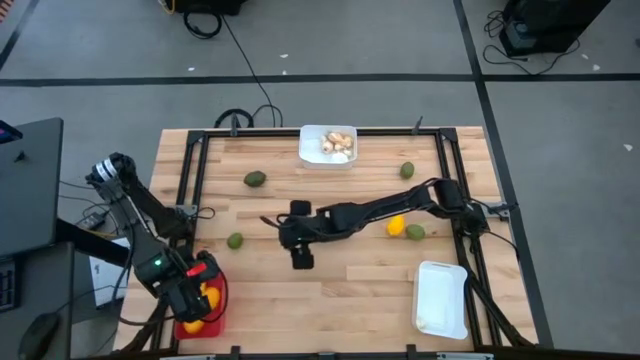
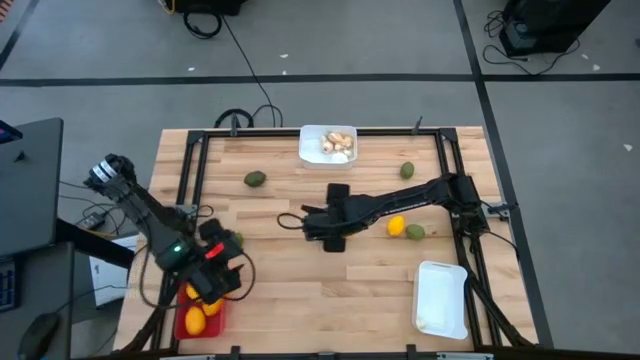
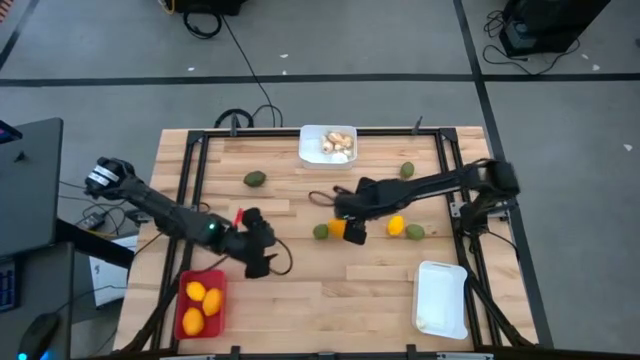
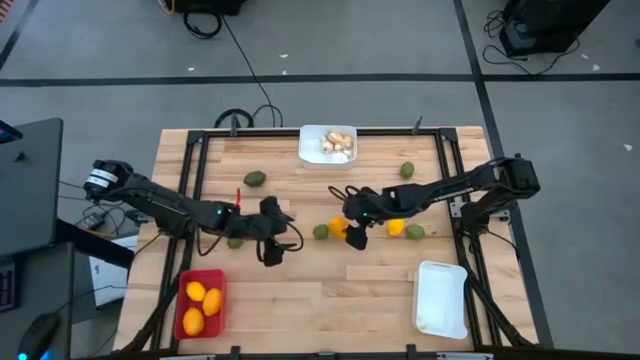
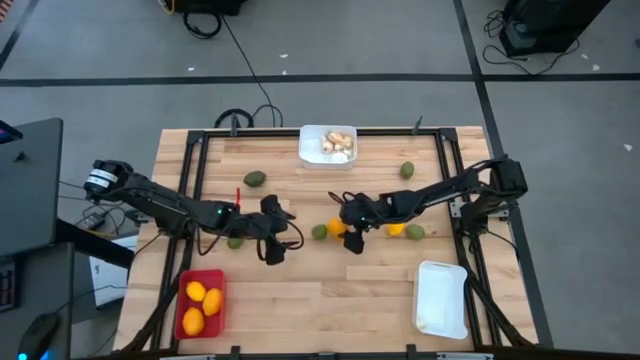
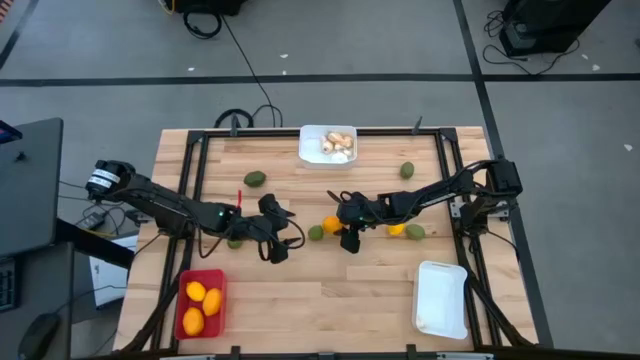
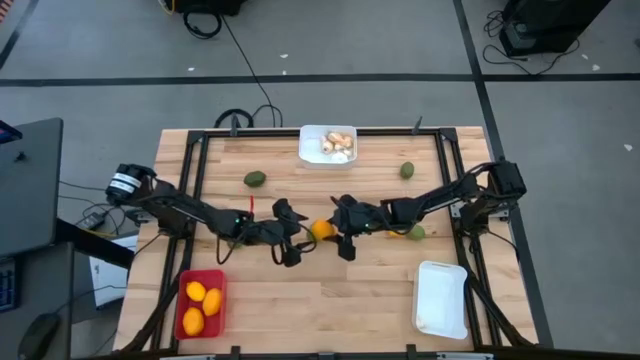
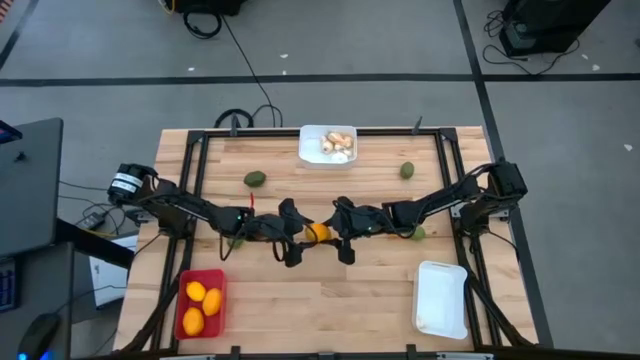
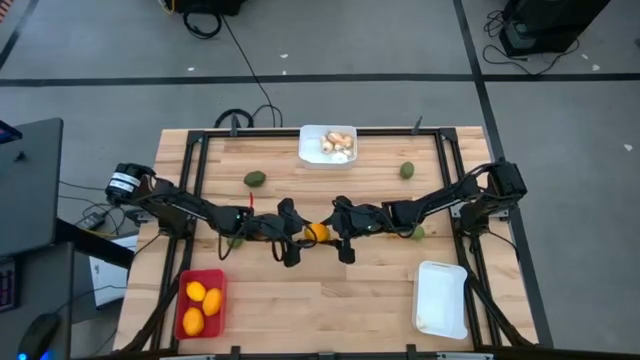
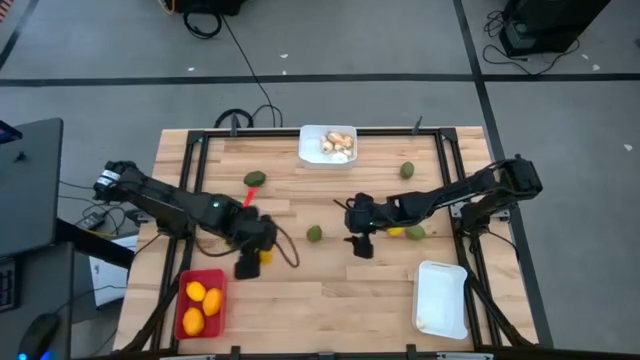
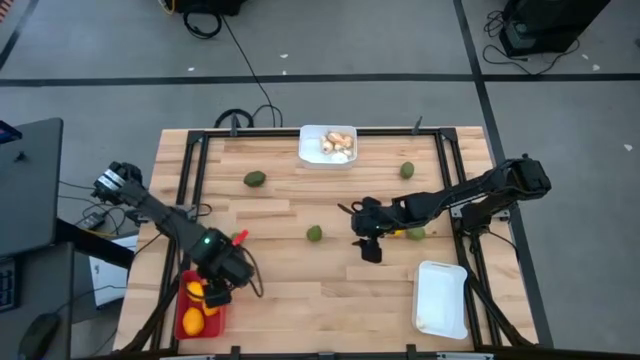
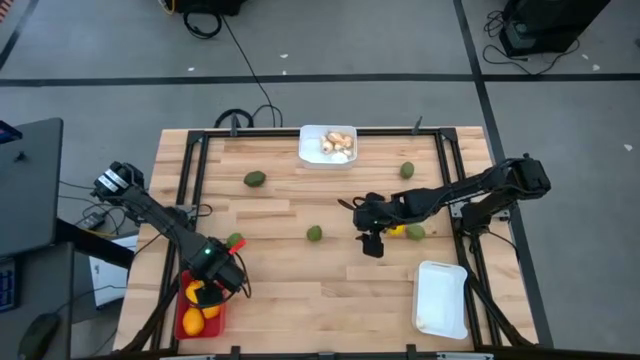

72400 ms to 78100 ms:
Task: Sort produce into baskets
Put the lemon into the red bin

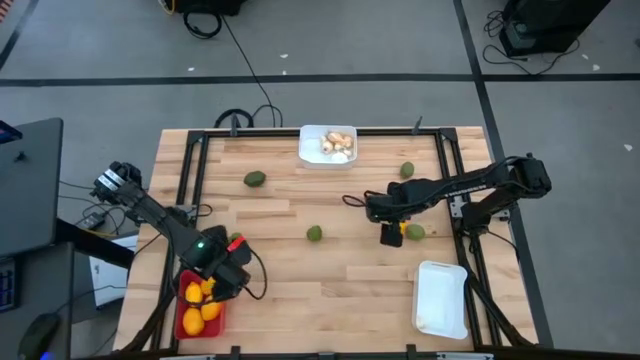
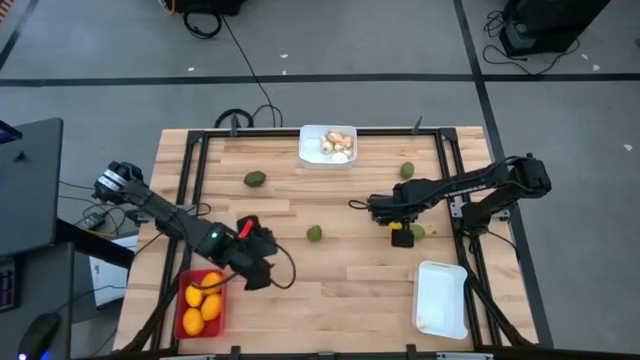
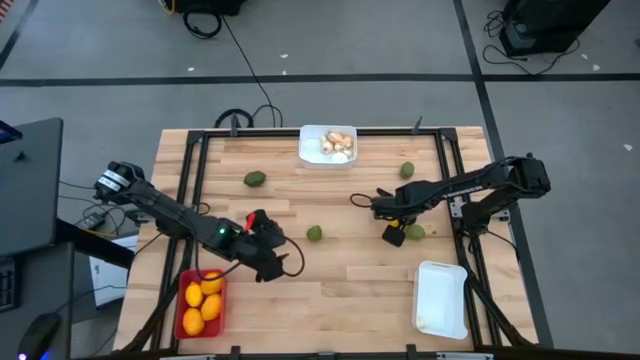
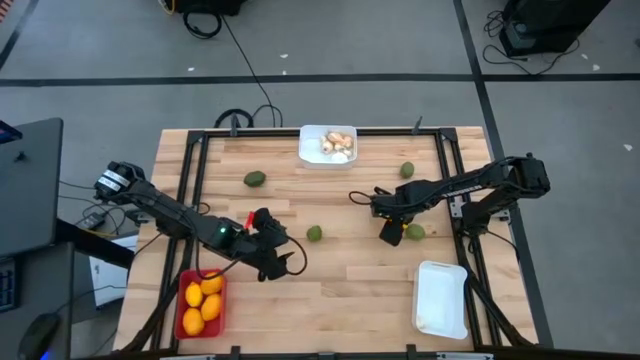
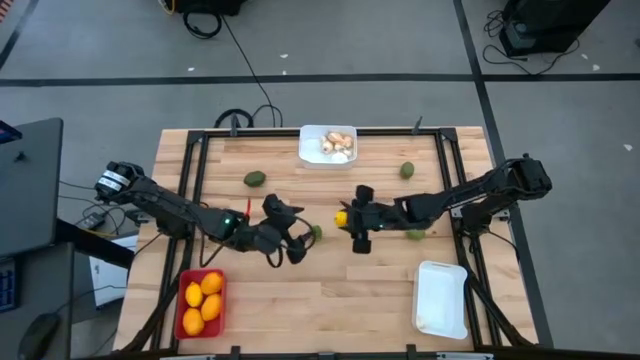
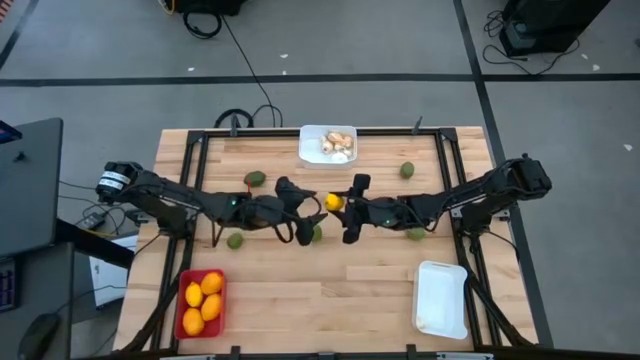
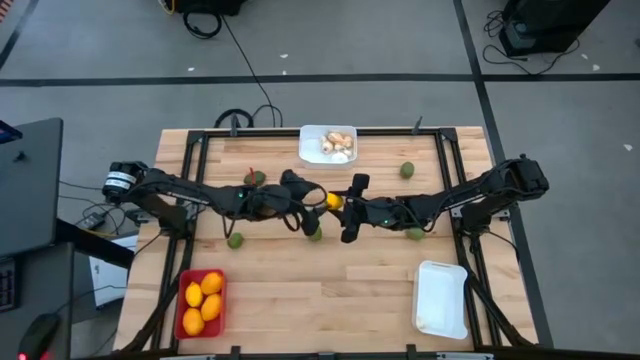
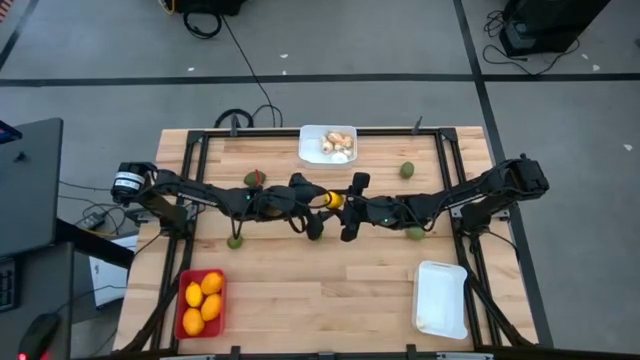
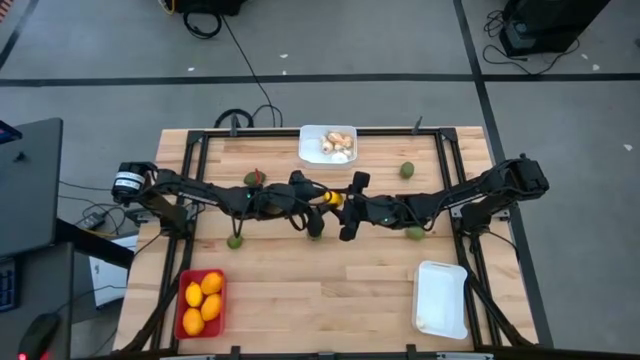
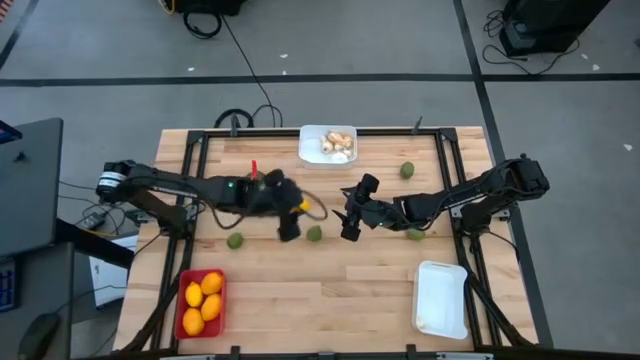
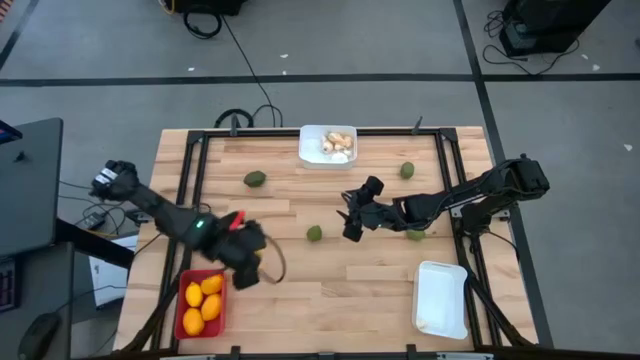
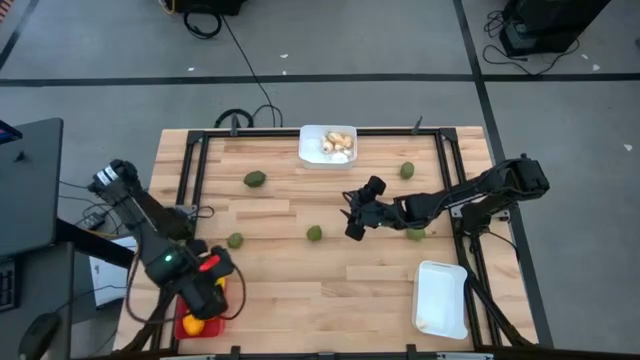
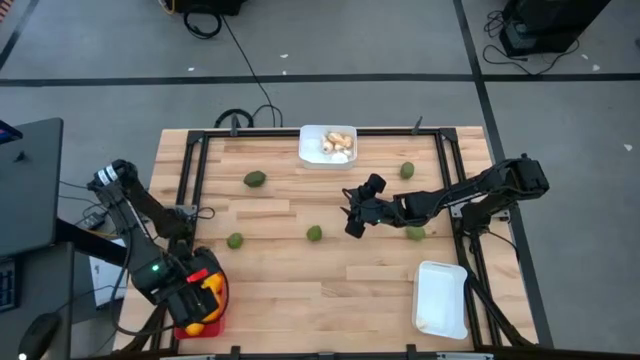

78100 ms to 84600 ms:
Put the lemon into the red bin

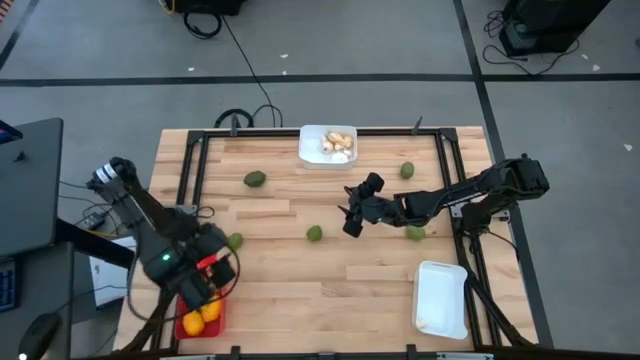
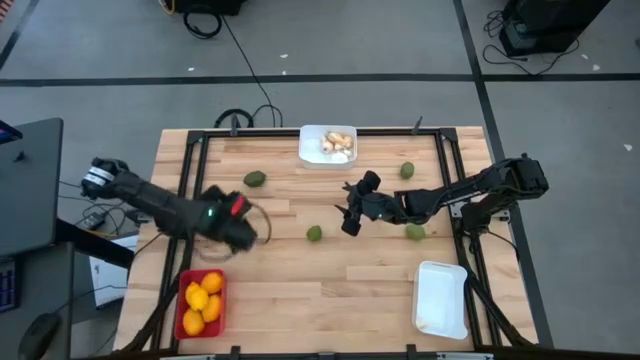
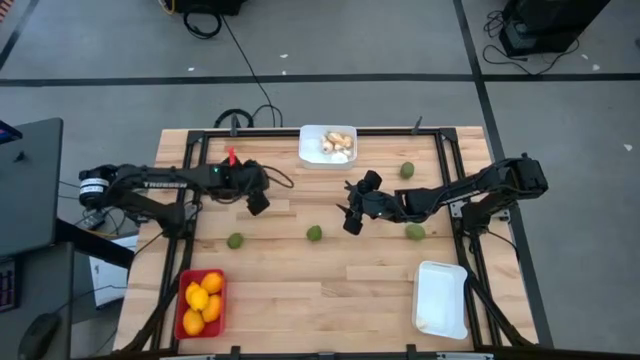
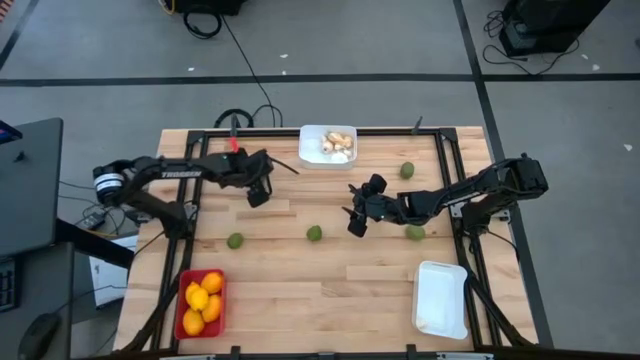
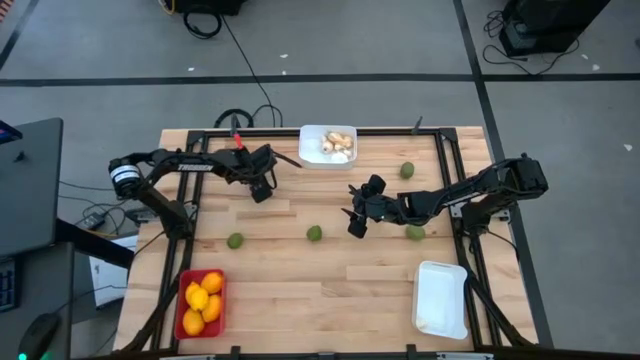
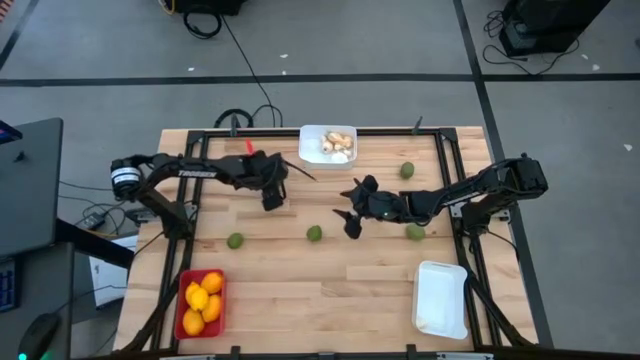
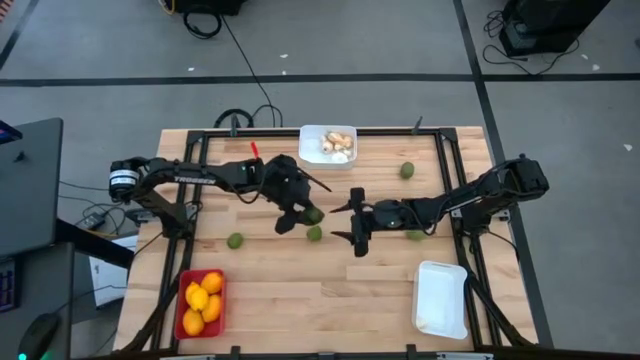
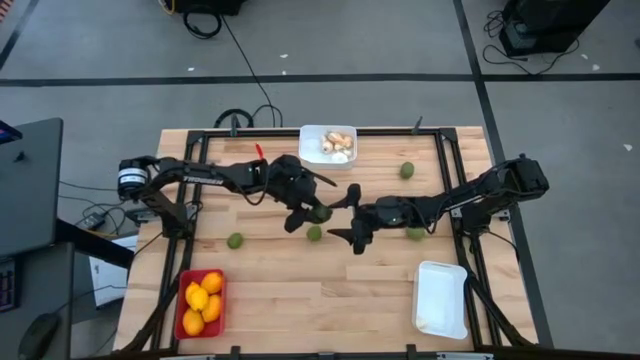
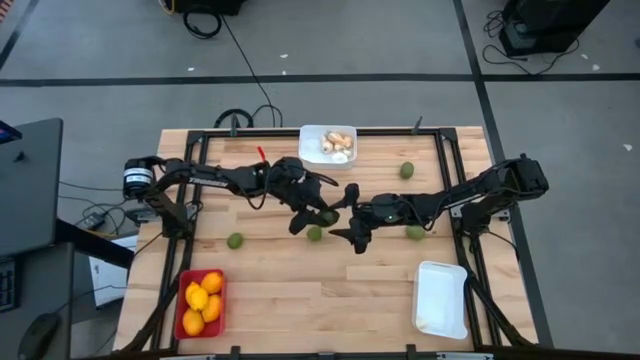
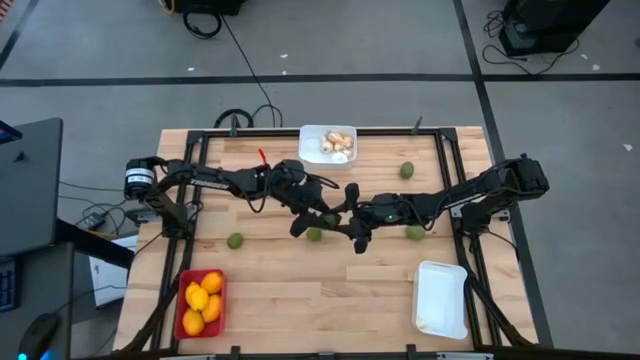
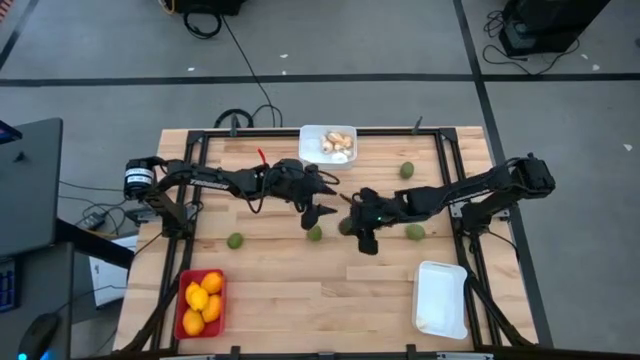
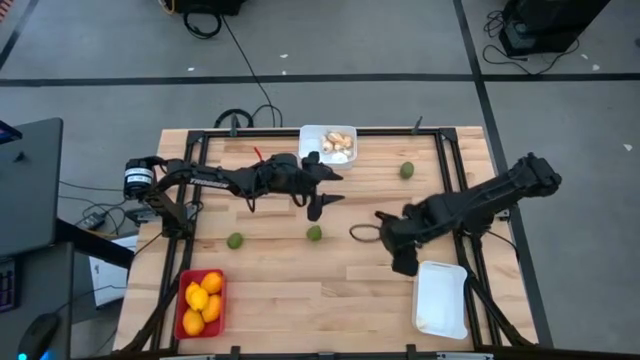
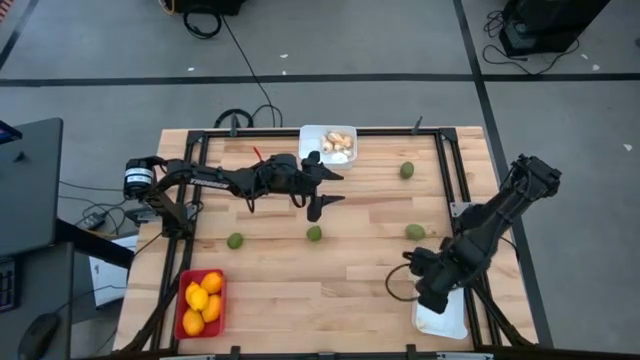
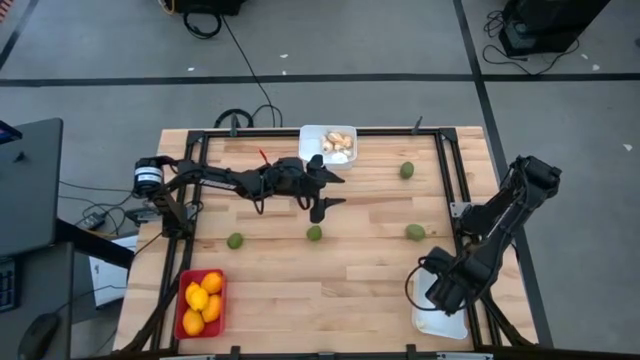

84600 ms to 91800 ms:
Put the lime into the bottom white bin

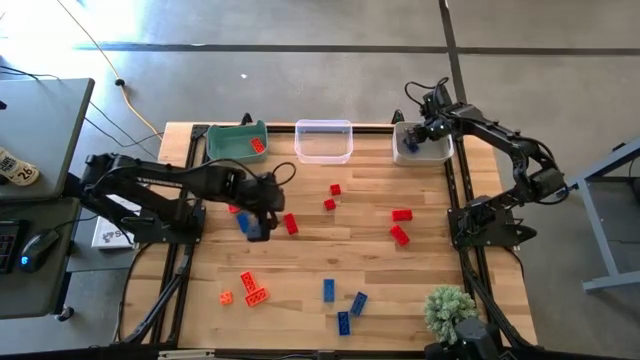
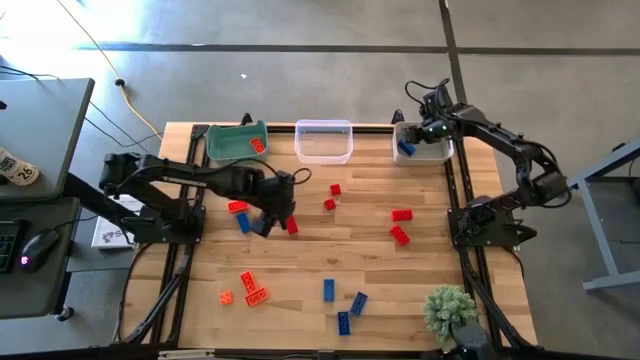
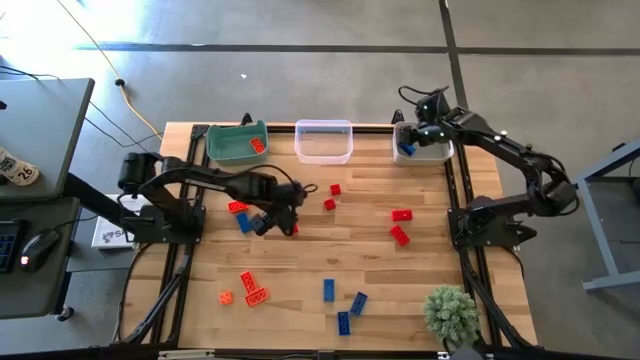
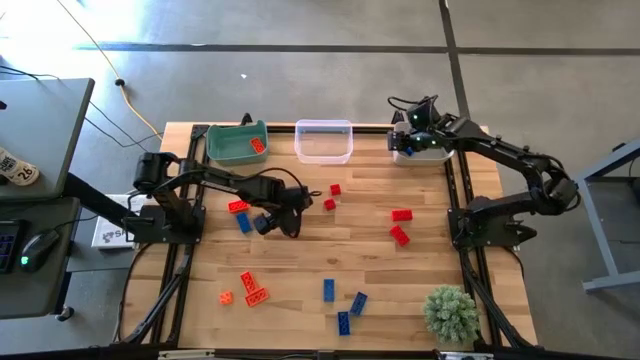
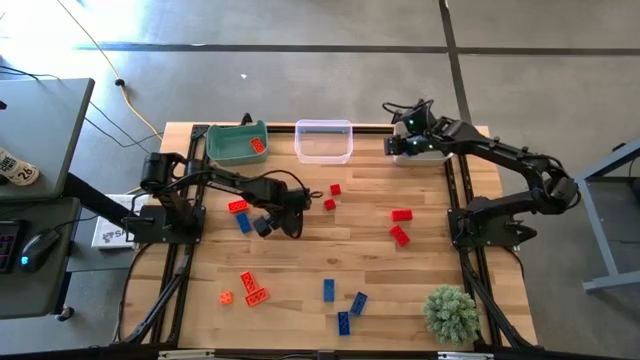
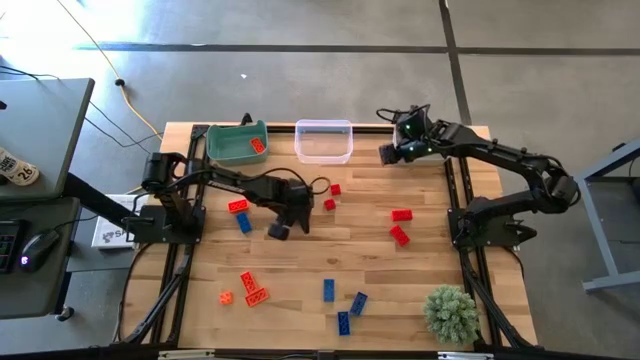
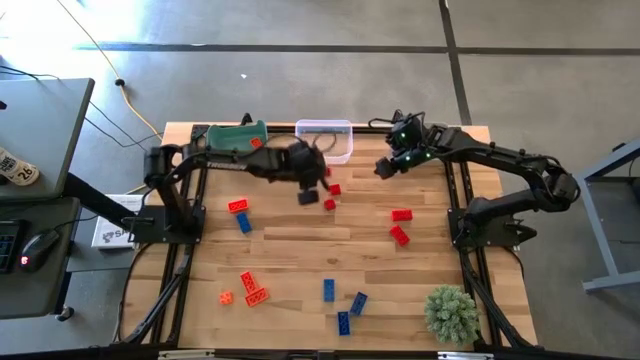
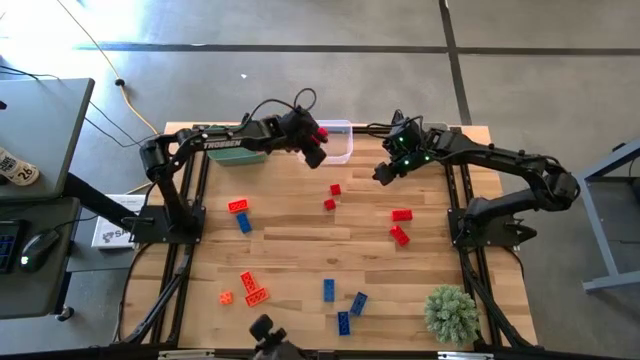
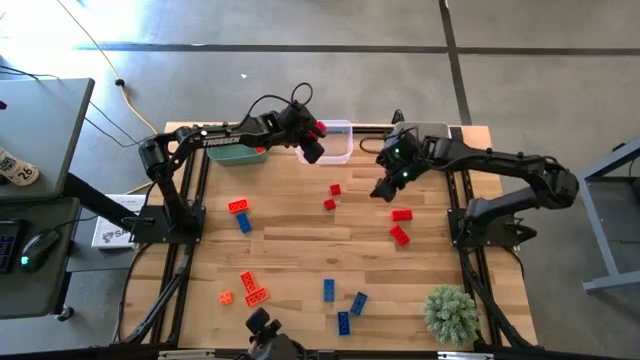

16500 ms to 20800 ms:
Task: Sort & place blocks by color
Put the red game piece into the transparent bin
